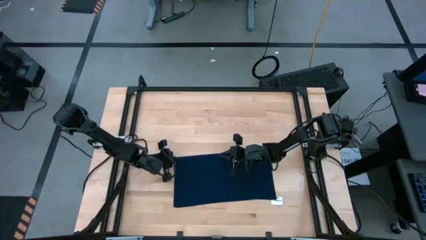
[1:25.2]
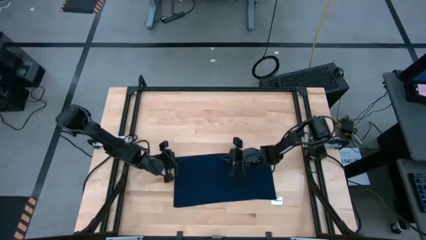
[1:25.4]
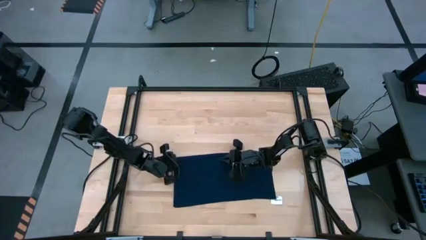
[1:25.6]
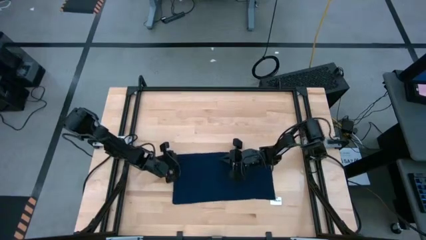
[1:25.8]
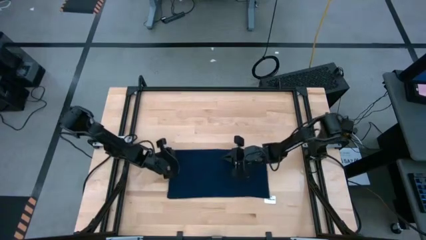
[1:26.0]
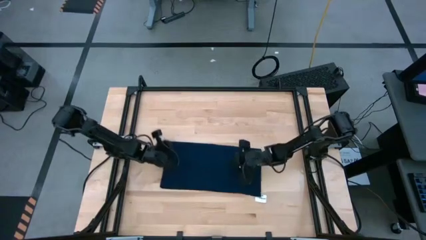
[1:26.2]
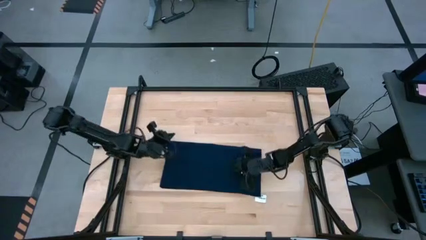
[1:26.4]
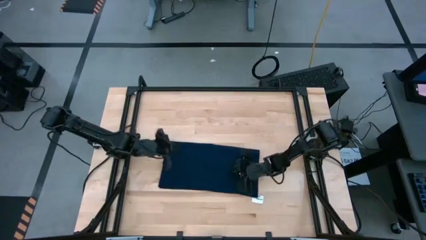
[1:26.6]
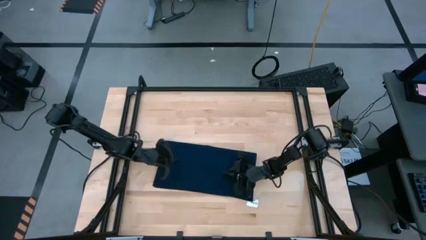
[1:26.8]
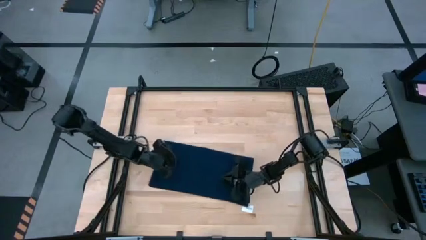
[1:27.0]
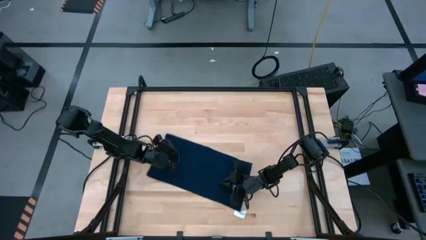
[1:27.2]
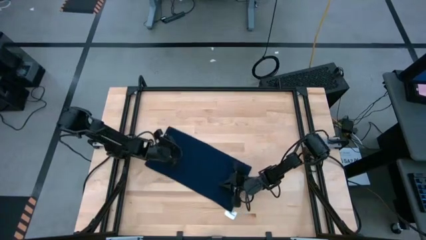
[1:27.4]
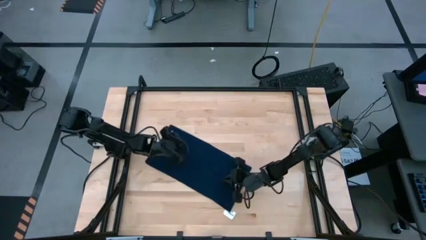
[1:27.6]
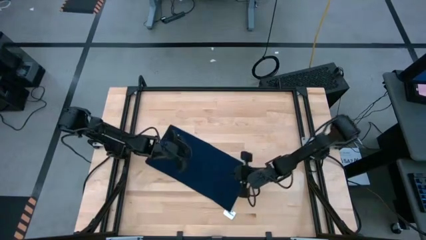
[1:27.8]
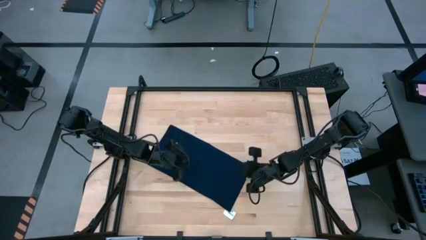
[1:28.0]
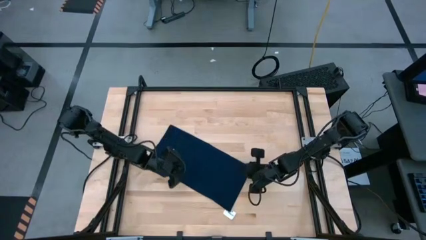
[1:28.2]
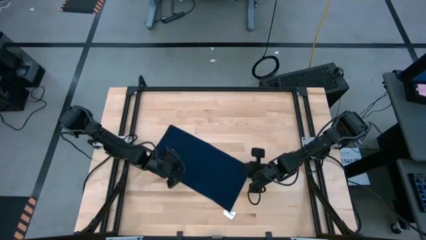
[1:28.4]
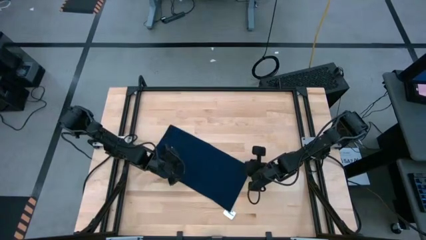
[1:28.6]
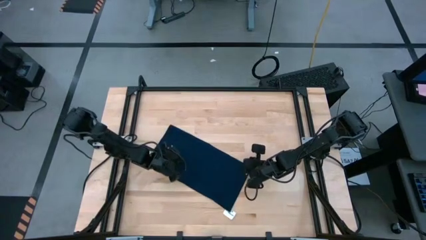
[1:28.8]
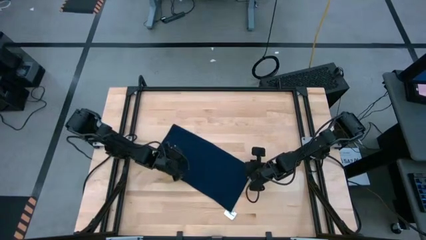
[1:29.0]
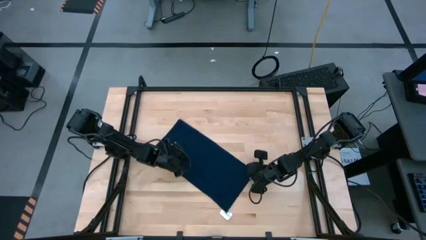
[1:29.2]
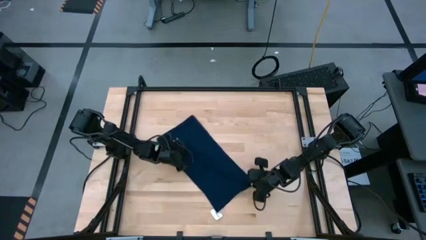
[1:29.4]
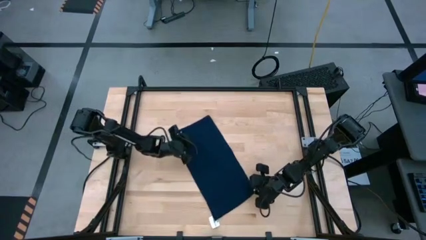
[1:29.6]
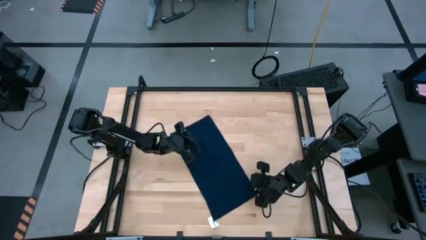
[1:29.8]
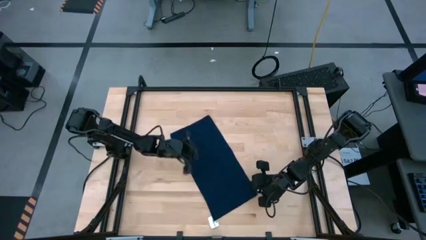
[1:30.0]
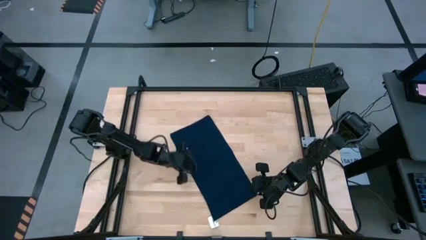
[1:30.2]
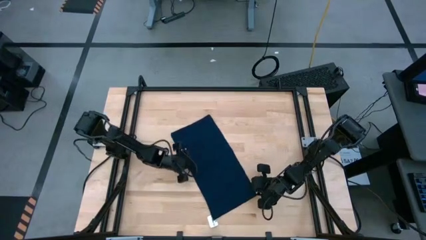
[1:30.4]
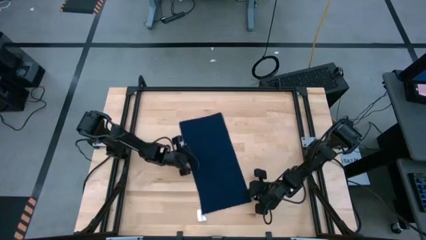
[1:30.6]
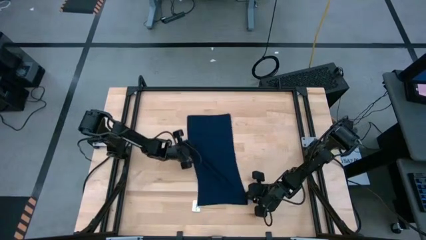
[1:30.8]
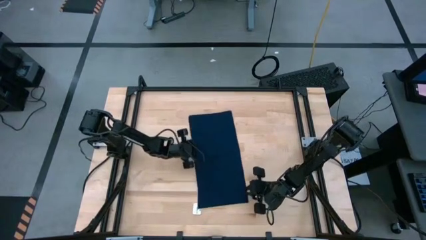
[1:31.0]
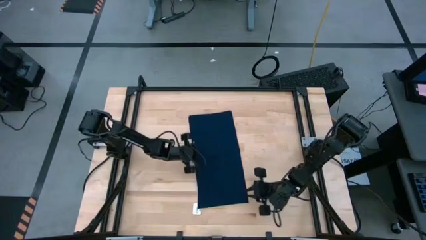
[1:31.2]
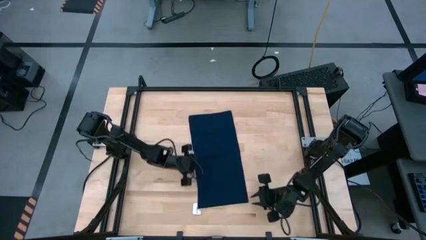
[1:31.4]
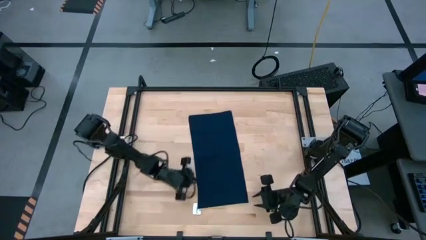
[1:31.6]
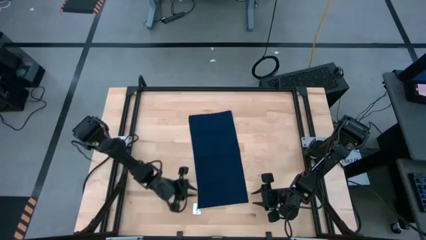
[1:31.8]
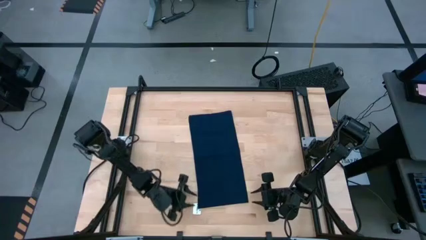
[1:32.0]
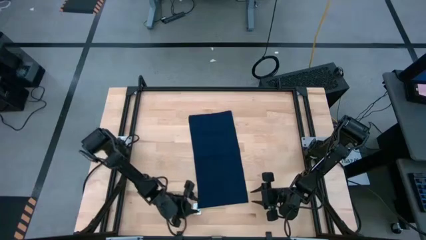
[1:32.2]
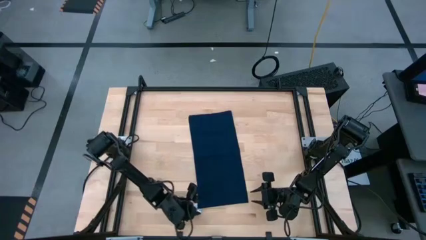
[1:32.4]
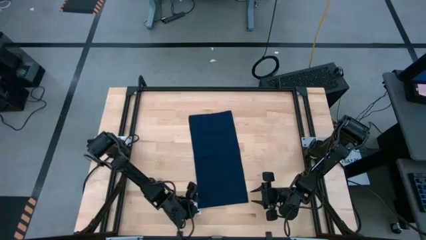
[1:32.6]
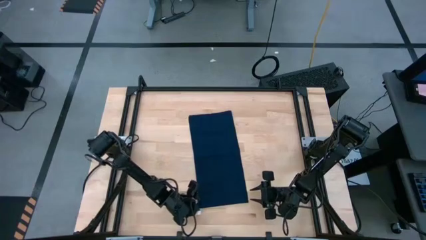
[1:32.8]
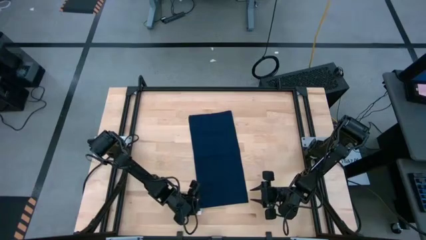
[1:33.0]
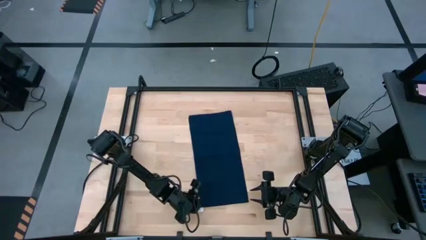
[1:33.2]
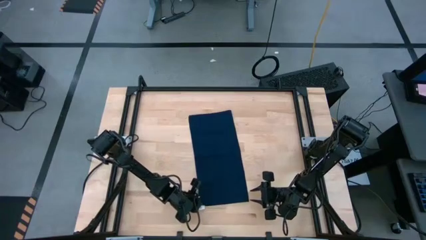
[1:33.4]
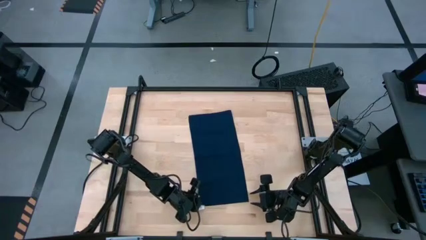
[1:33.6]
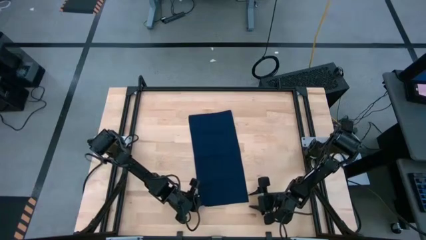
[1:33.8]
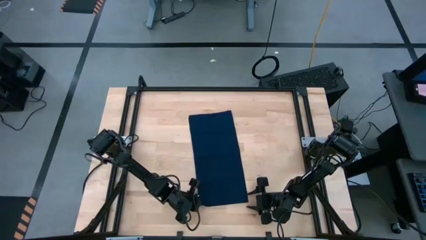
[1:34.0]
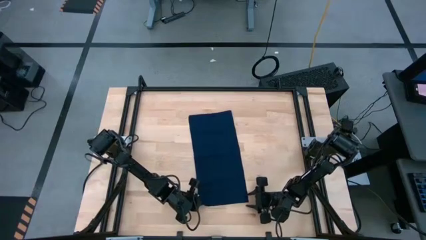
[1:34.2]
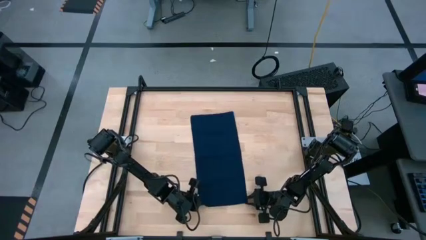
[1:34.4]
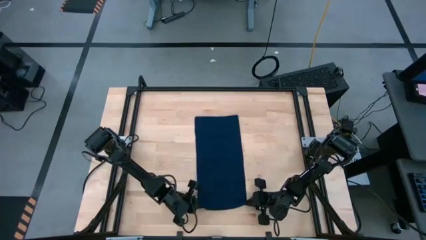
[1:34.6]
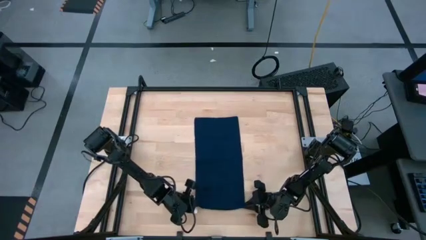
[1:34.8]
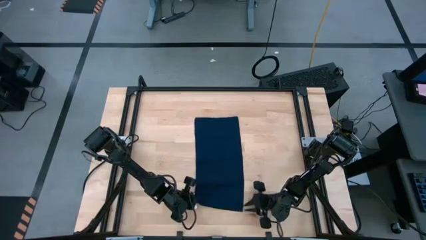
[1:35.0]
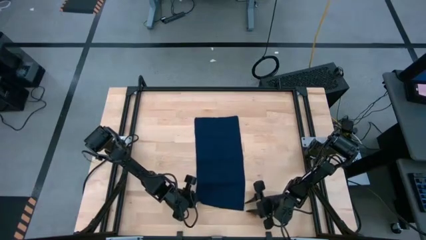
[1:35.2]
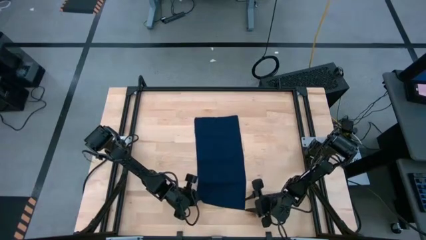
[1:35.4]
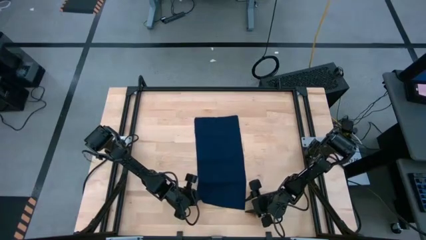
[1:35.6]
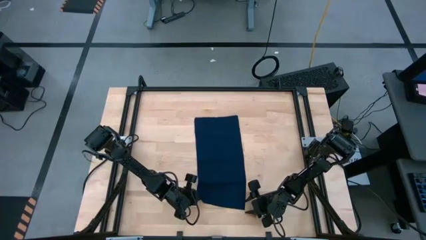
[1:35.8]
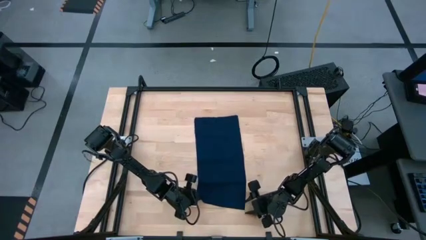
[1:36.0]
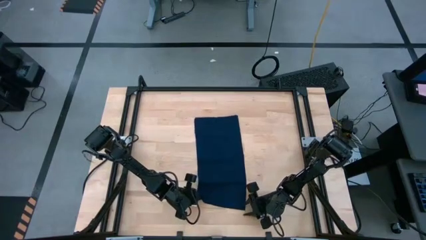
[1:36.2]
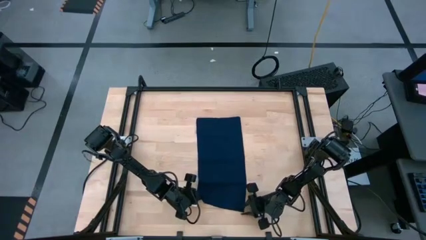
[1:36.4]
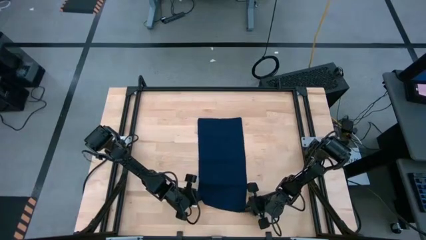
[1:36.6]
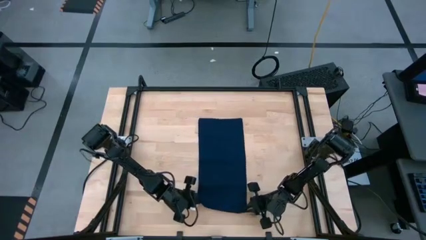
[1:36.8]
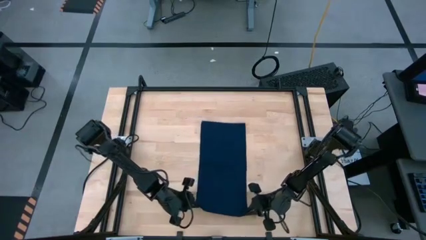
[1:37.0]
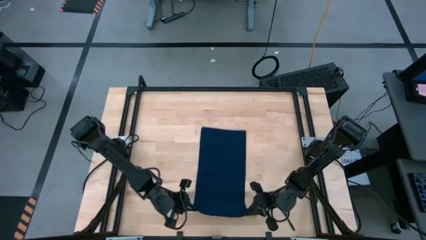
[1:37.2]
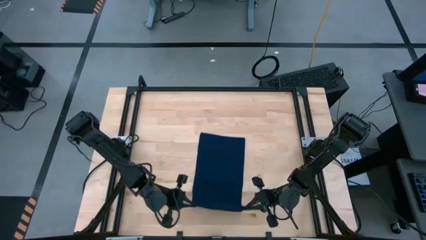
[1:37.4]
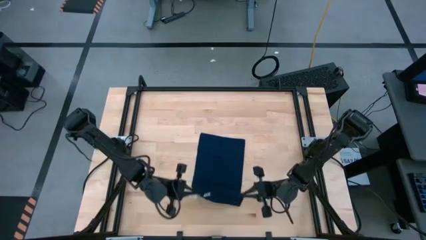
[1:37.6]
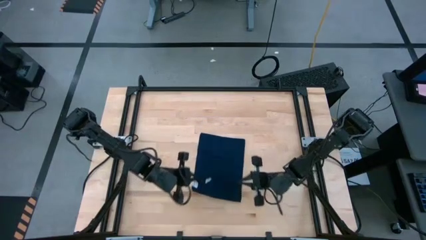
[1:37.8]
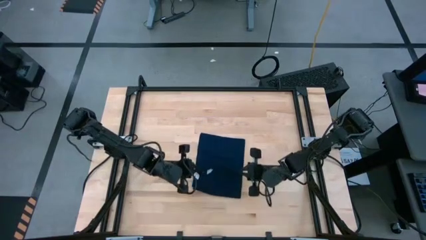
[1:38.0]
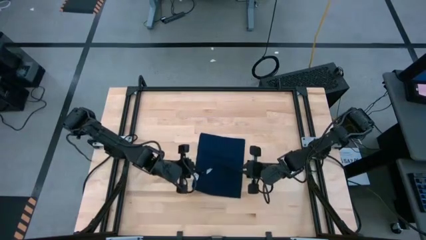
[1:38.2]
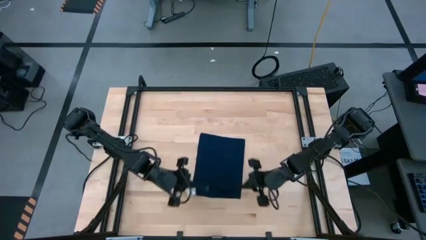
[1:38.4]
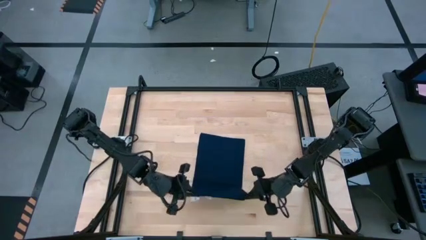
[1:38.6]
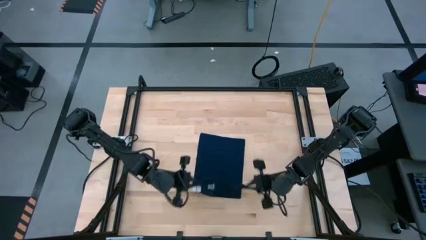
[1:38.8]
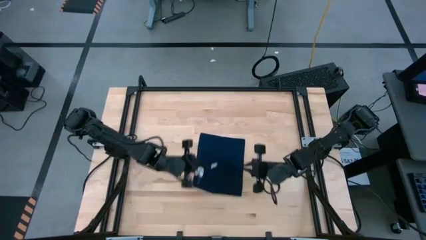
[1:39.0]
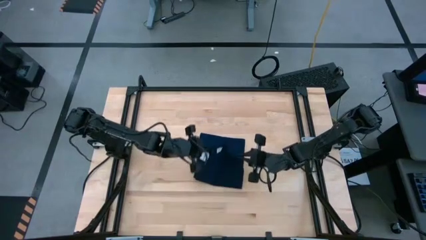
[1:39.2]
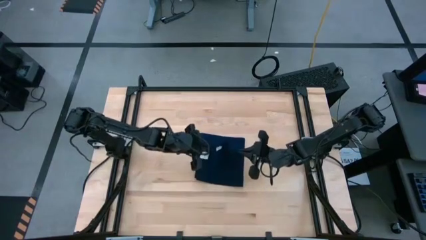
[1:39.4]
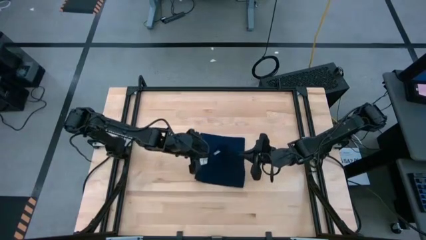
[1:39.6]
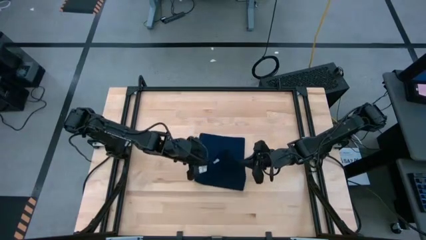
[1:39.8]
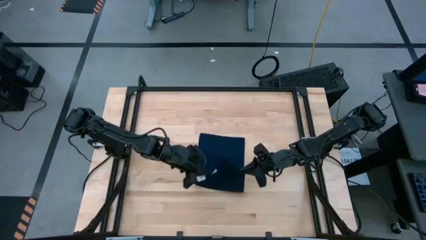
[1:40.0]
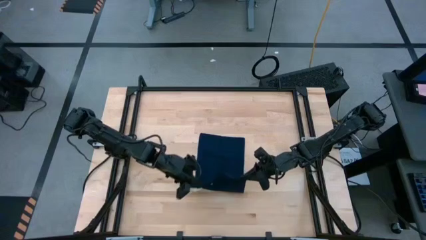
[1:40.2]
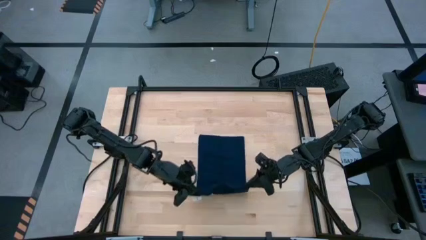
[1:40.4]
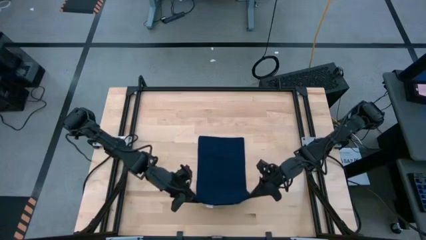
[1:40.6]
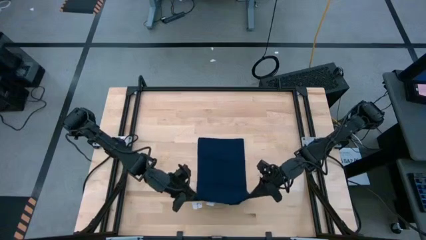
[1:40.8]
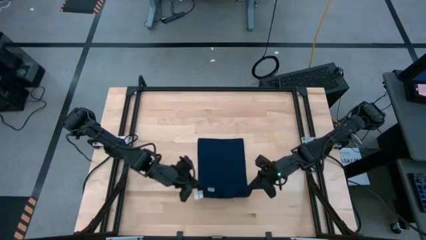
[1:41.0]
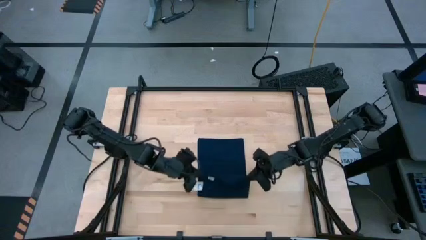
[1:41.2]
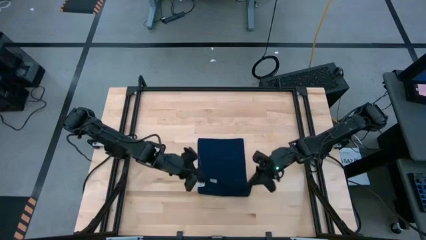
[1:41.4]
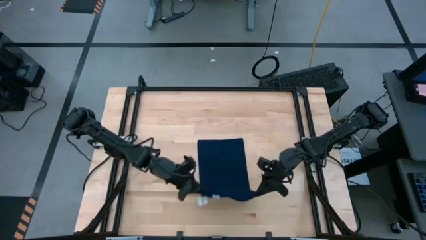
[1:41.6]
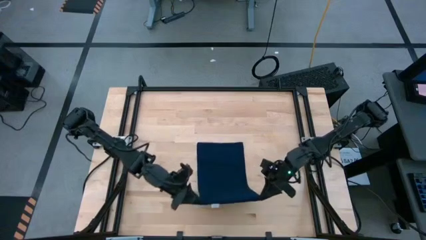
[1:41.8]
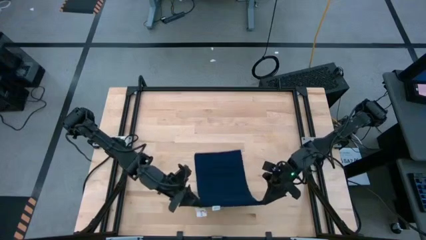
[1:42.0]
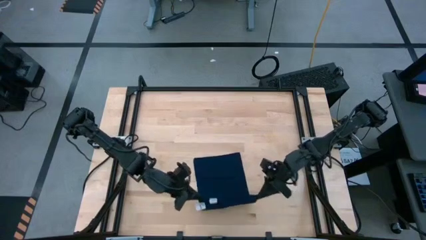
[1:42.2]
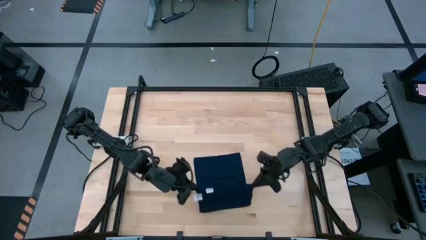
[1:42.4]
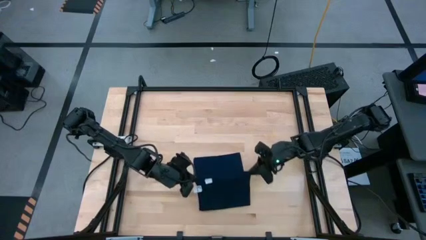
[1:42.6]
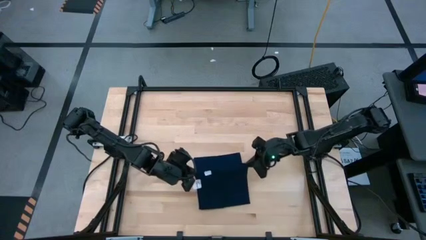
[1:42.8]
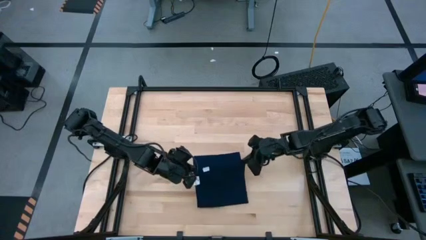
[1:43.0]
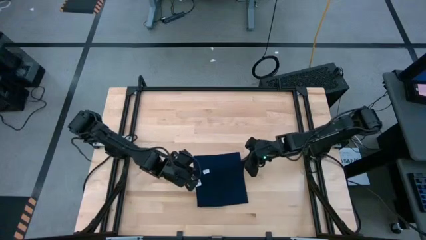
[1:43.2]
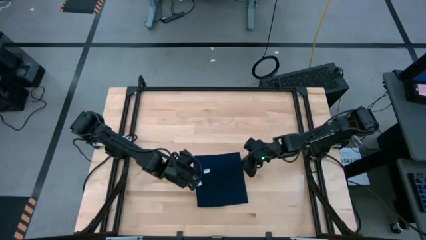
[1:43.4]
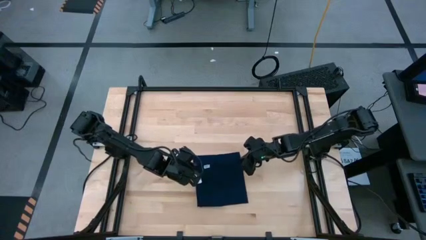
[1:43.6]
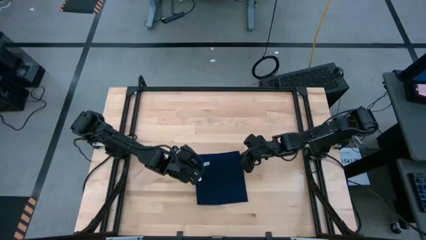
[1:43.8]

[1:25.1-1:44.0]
Task: Roll towel into tight, uniform cylinder
Roll the blue cloth napkin
